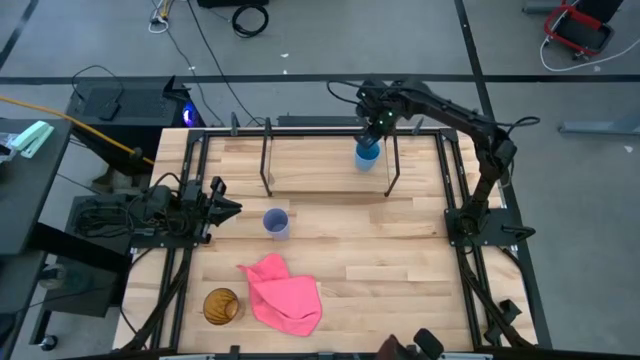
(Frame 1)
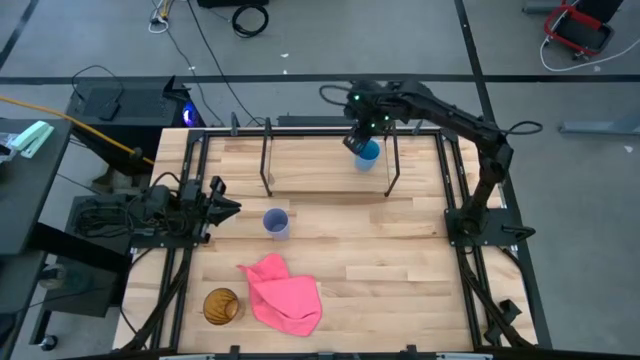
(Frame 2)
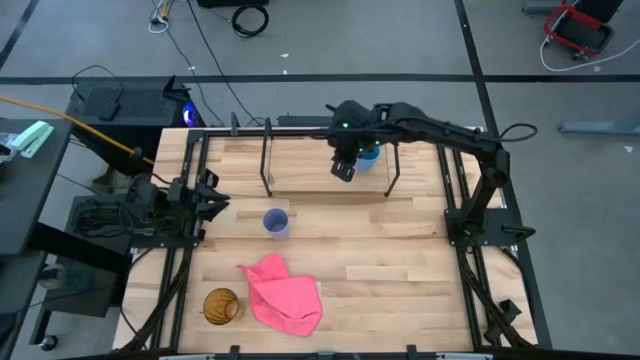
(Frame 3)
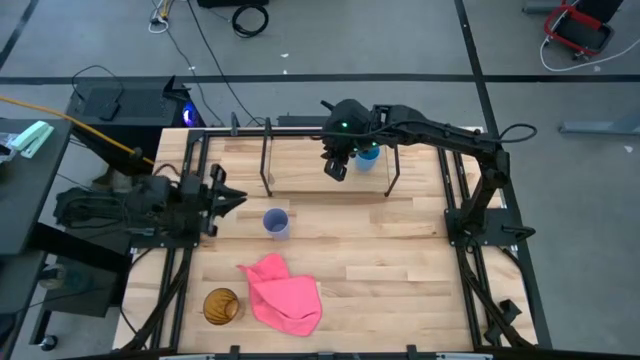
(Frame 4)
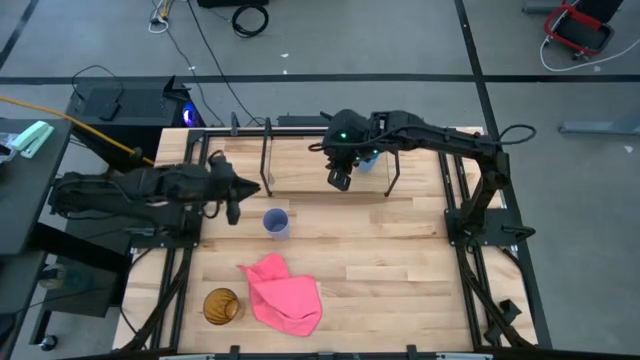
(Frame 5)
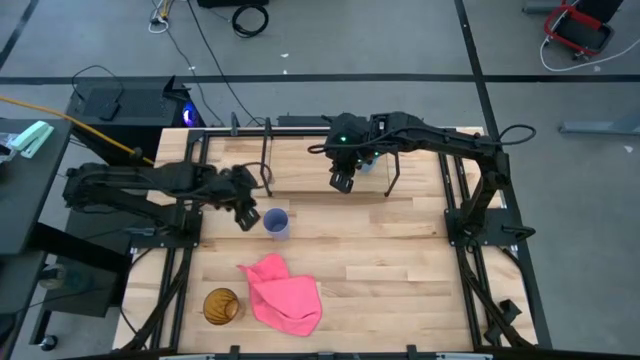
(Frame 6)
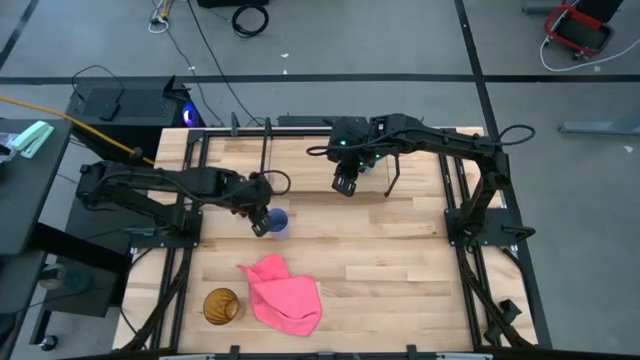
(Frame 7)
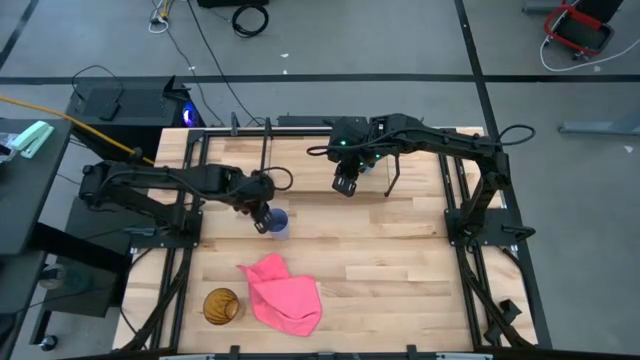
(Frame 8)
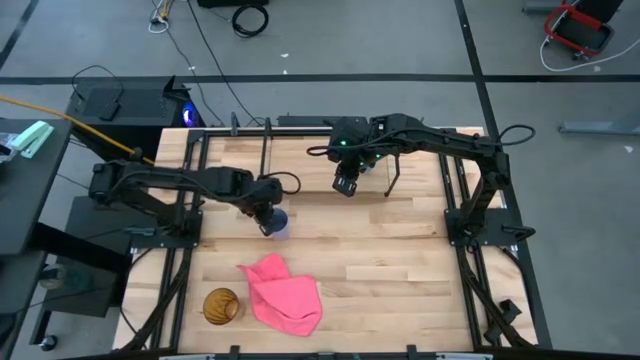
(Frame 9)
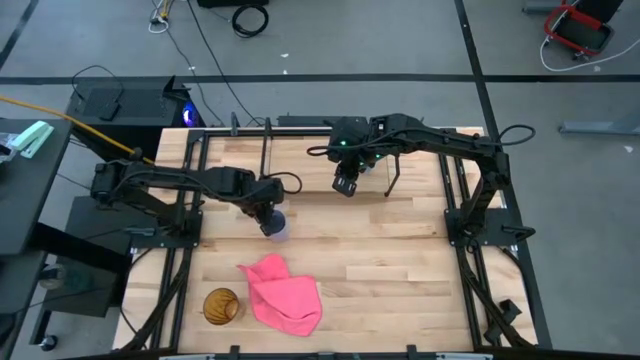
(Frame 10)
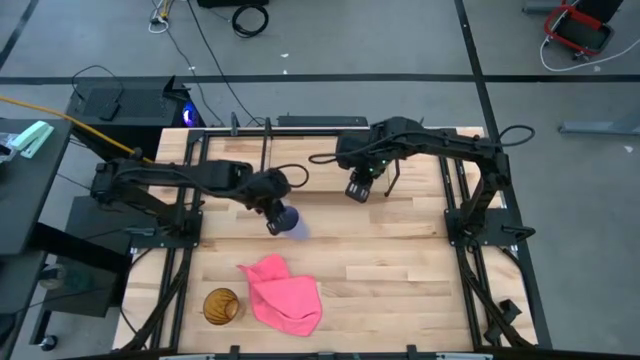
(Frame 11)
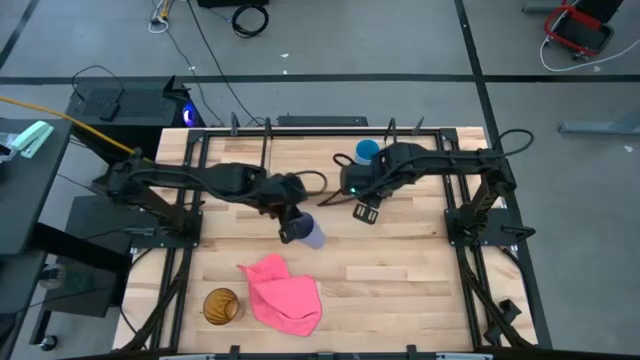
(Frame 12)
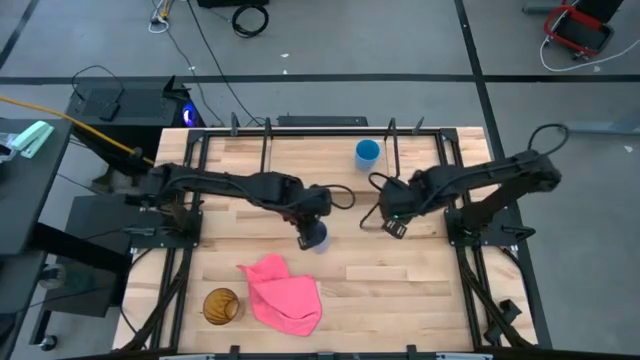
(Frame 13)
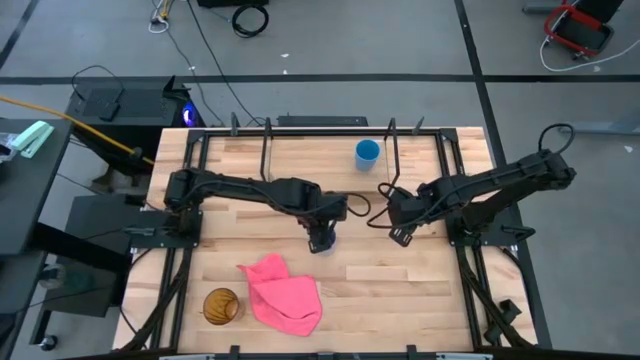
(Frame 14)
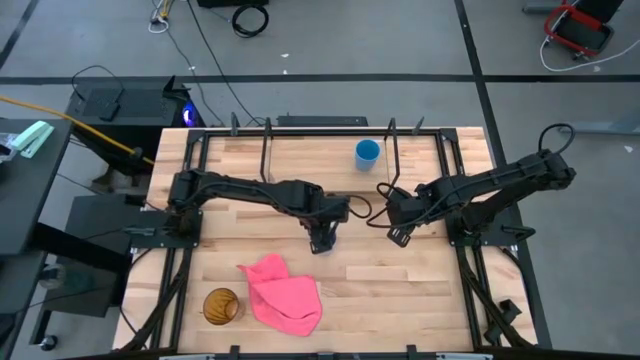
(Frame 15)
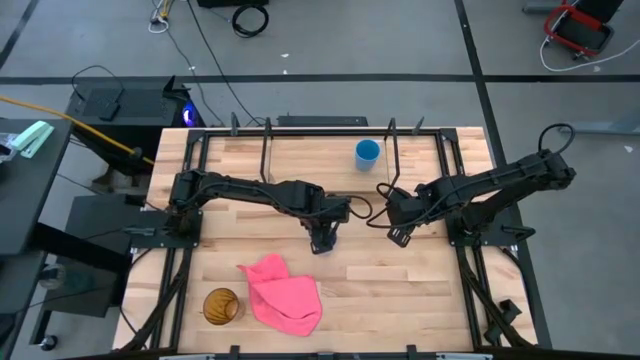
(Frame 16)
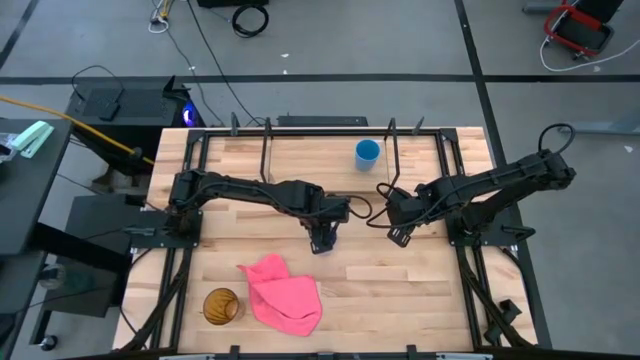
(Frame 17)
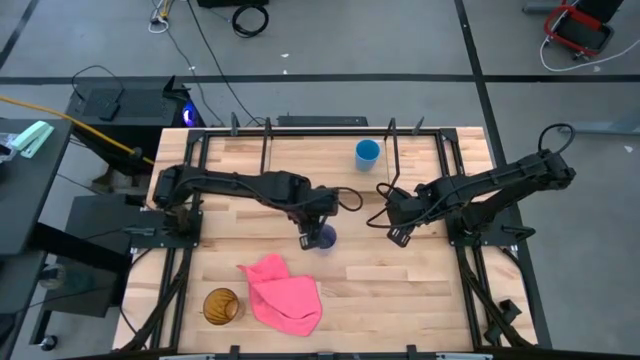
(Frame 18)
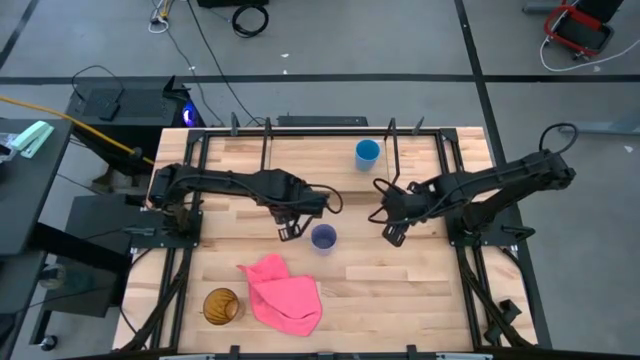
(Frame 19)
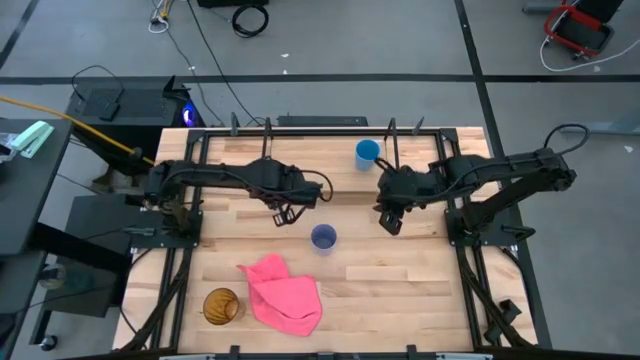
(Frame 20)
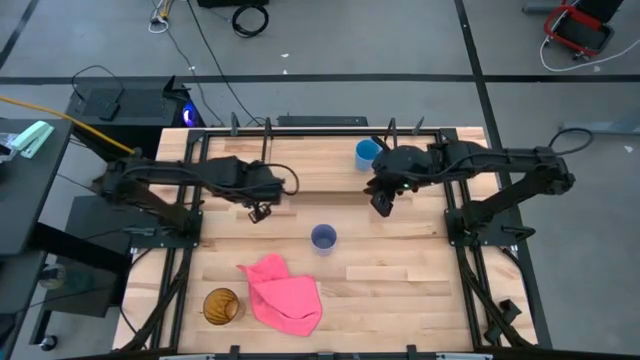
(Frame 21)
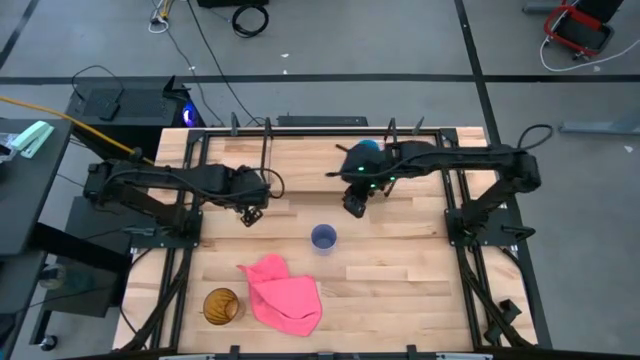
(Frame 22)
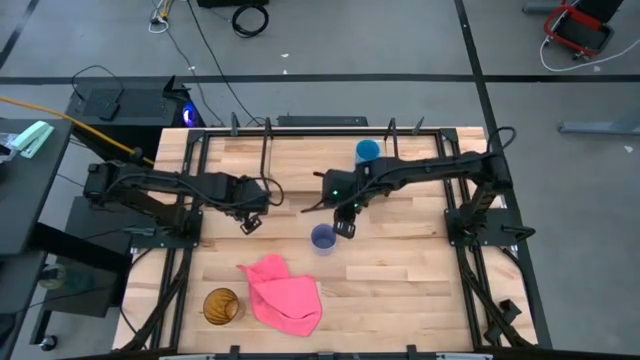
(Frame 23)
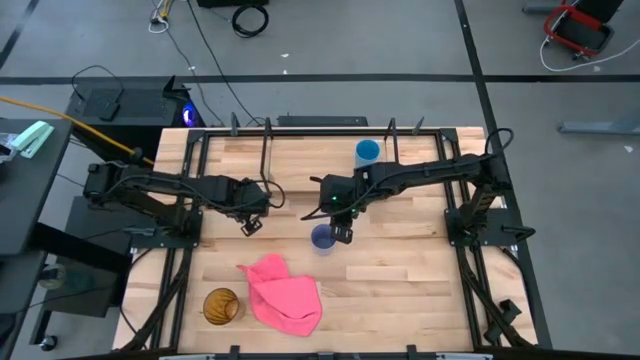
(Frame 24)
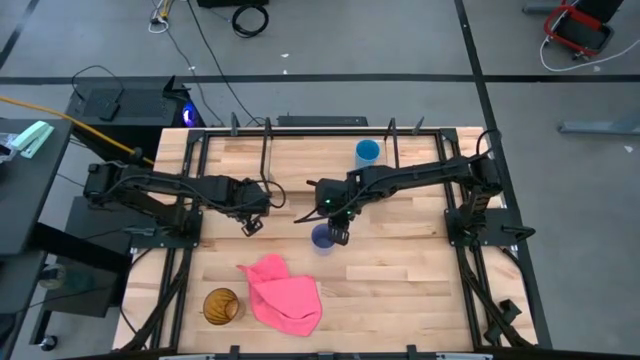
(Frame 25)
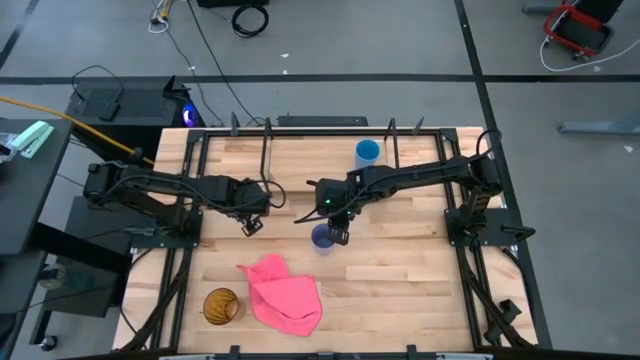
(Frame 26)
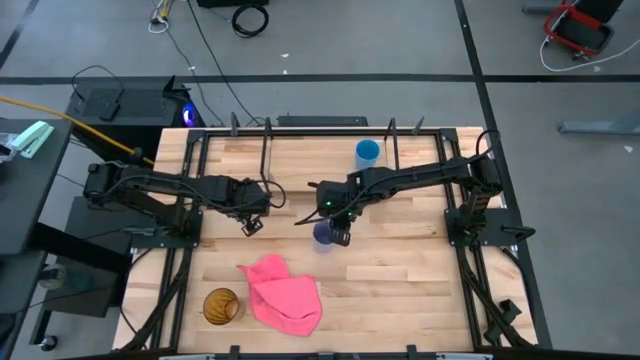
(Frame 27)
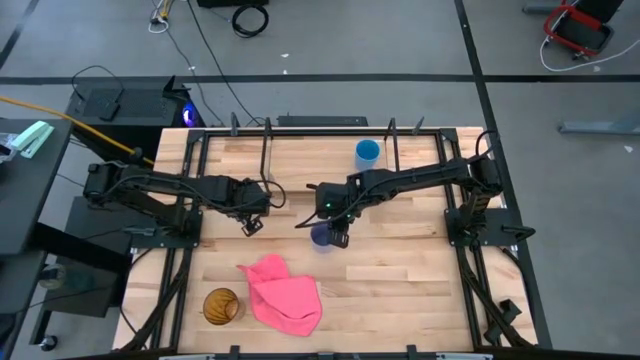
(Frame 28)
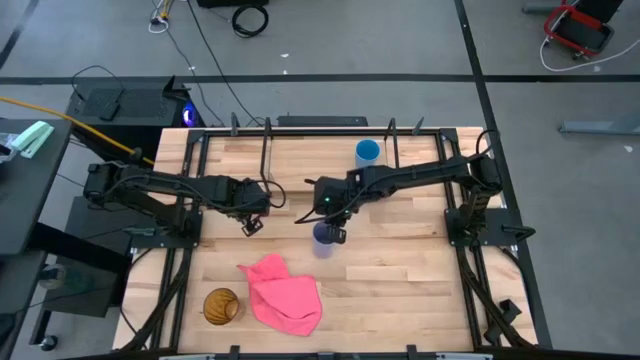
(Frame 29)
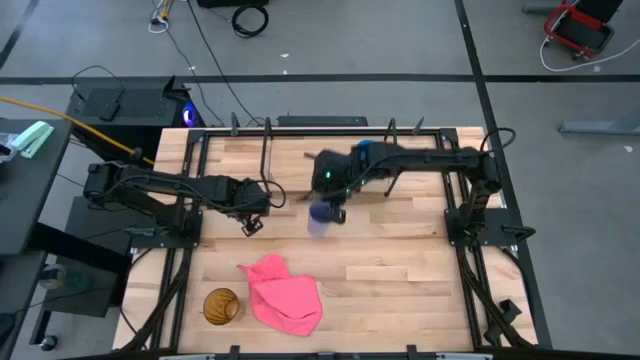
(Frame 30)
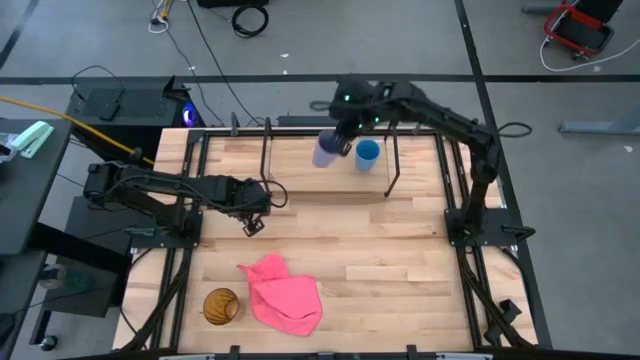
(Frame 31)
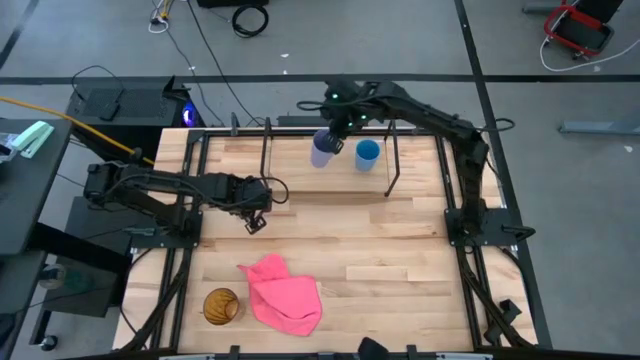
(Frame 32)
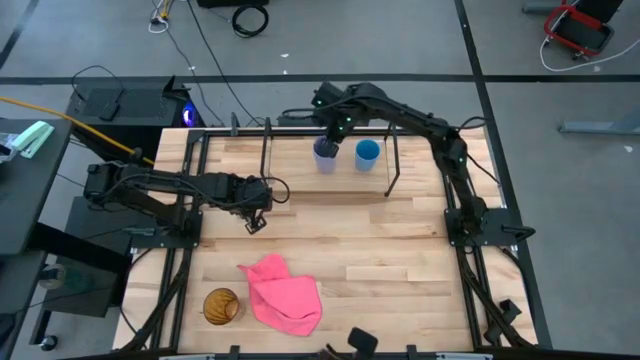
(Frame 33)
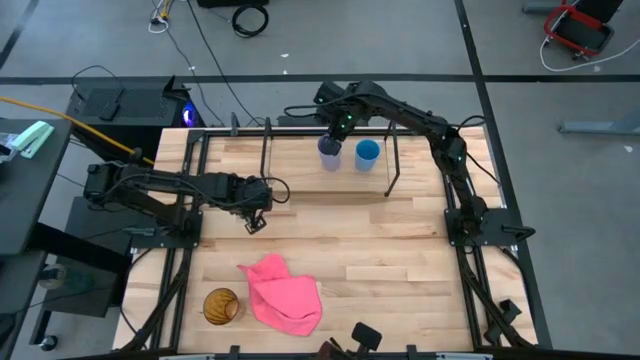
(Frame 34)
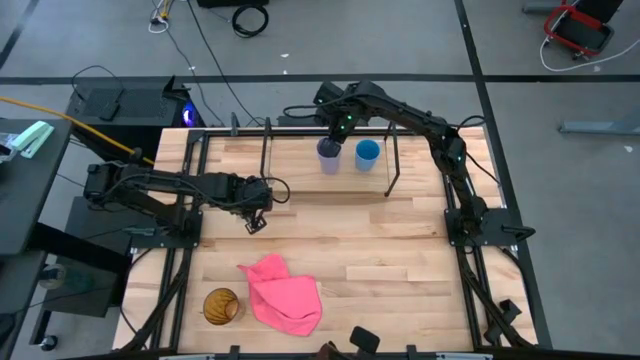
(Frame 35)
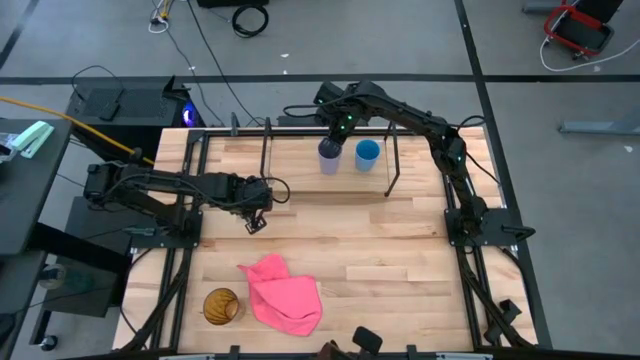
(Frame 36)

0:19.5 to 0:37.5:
Task: Stack small to large cups/mugs on shelf
Put the purple cup on the shelf

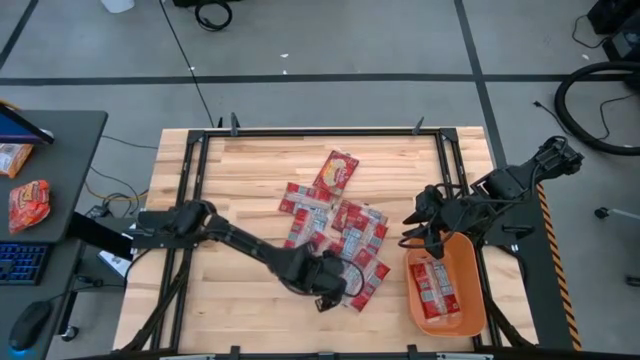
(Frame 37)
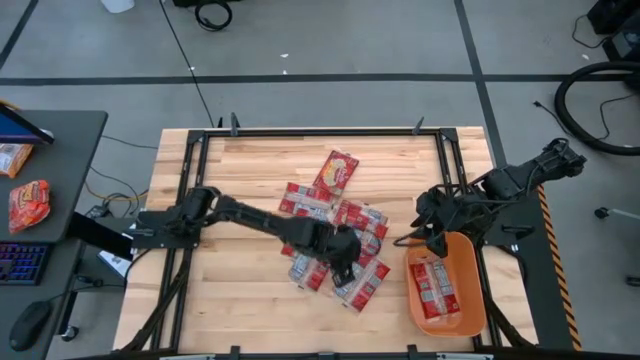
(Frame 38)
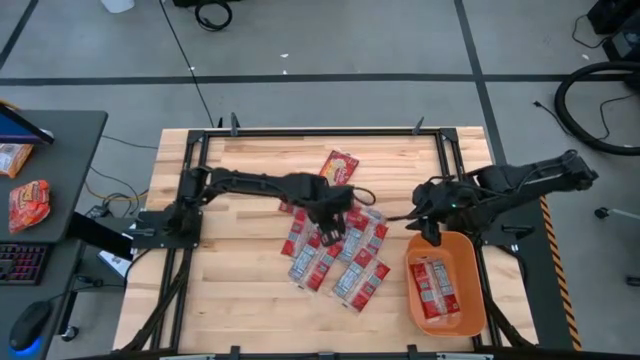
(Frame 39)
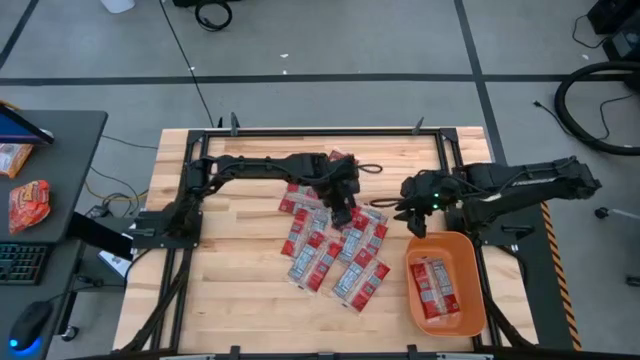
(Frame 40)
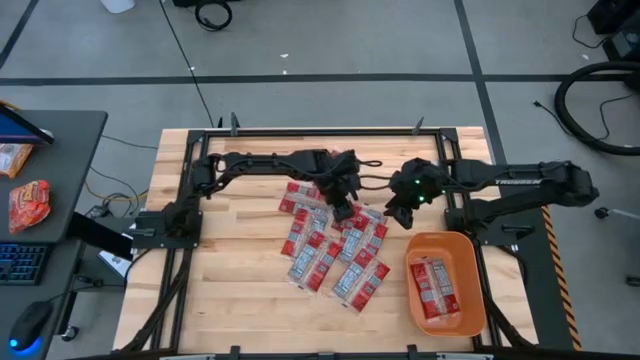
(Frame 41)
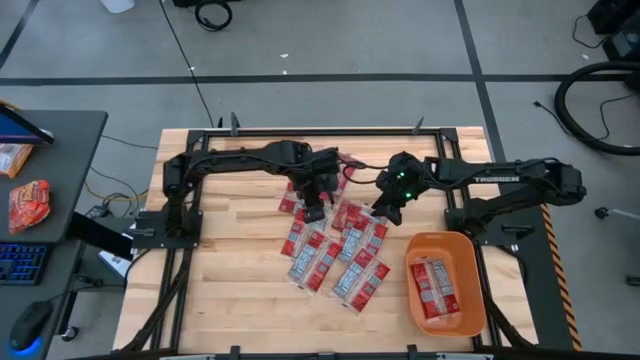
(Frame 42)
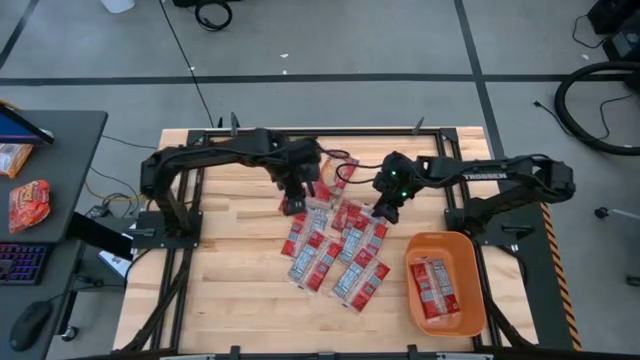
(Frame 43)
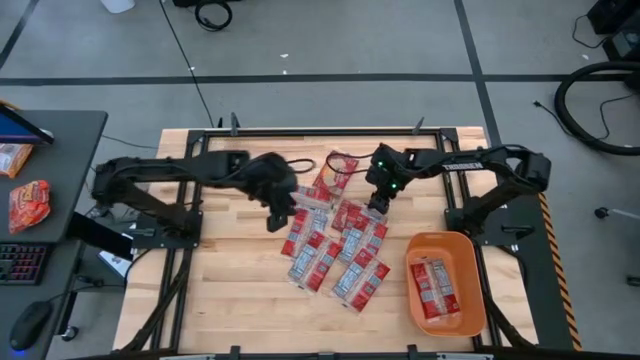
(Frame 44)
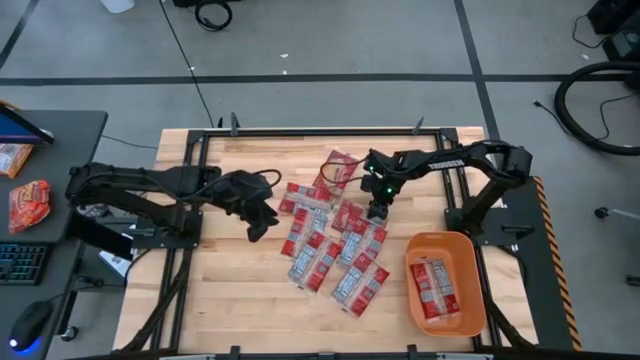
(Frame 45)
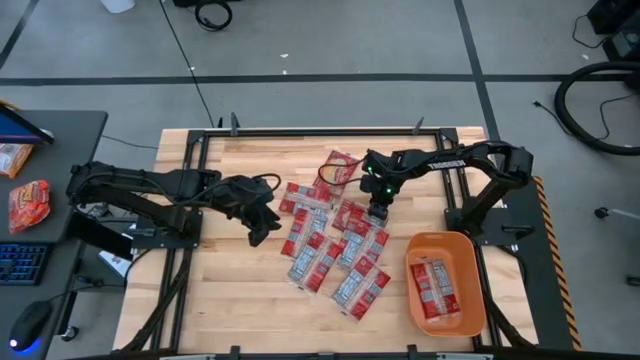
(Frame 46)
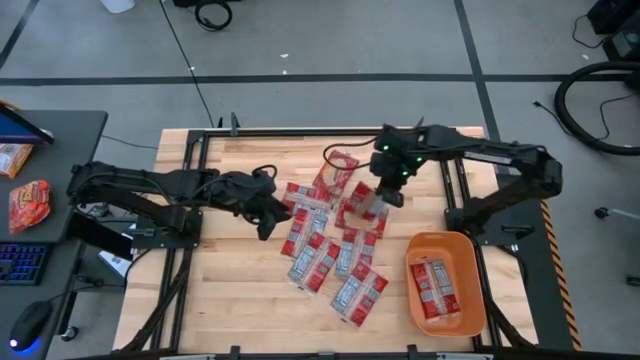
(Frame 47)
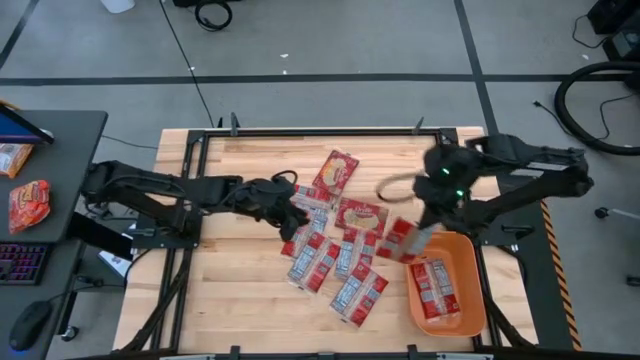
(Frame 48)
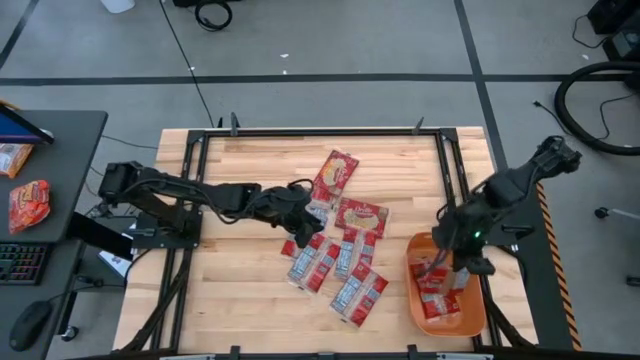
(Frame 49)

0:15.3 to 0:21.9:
Task: Sort popcorn bags into baskets
Put the red popcorn bag into the orange bin
